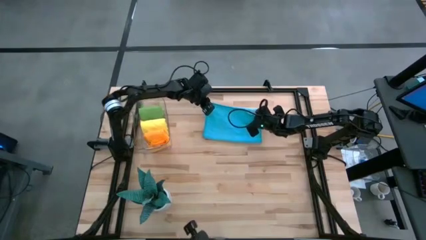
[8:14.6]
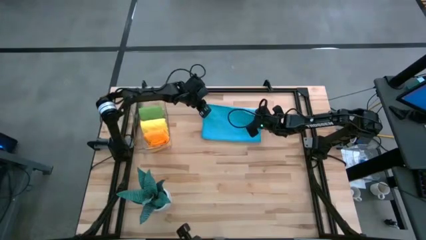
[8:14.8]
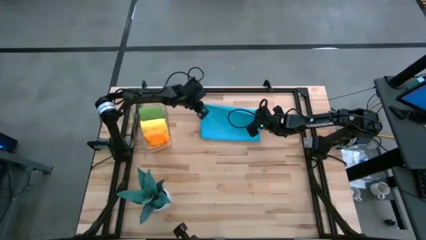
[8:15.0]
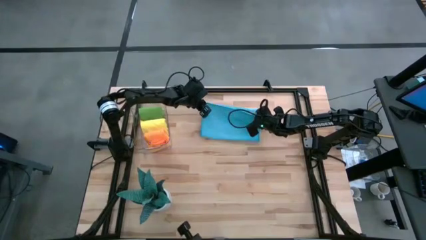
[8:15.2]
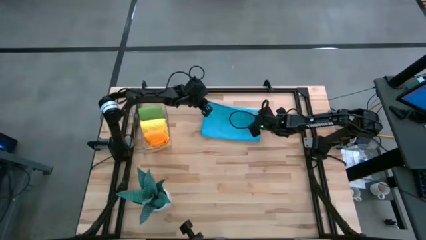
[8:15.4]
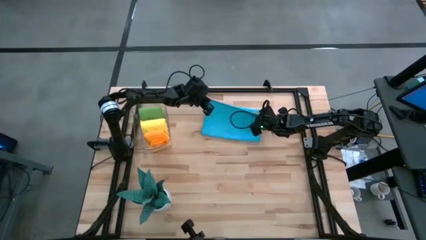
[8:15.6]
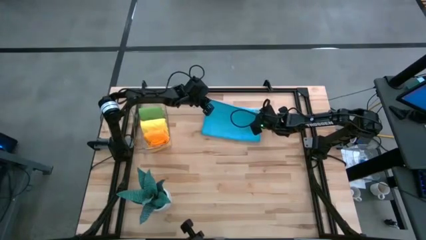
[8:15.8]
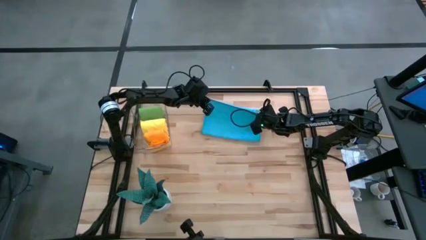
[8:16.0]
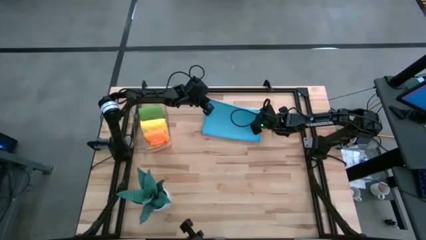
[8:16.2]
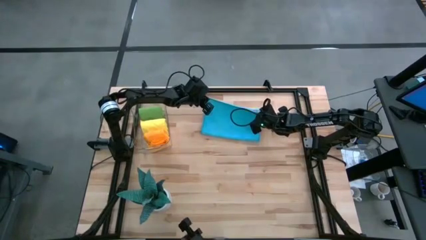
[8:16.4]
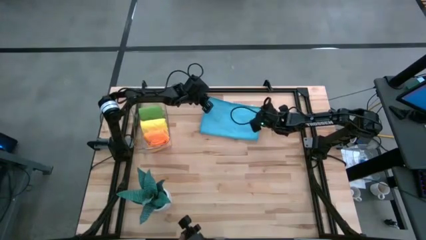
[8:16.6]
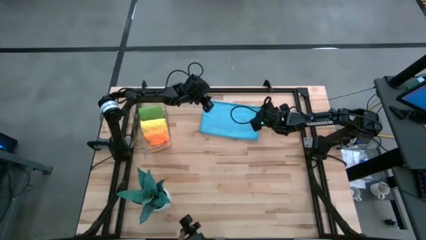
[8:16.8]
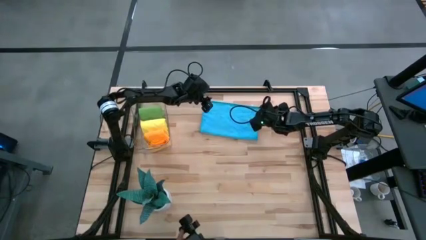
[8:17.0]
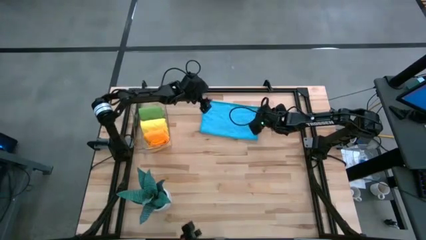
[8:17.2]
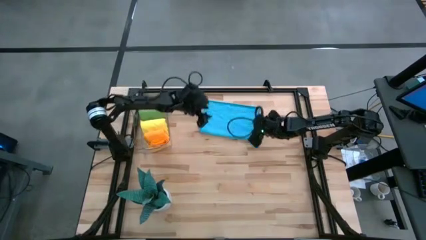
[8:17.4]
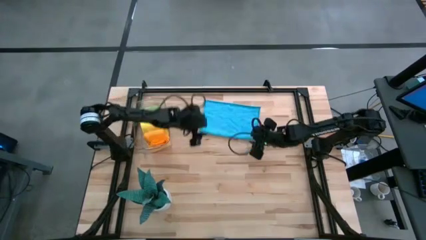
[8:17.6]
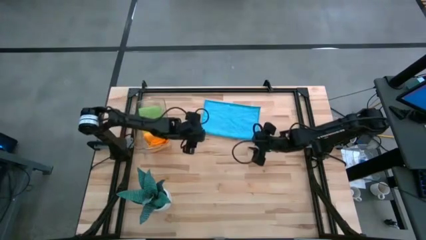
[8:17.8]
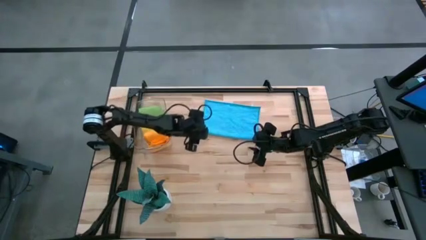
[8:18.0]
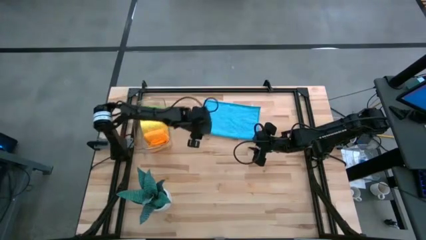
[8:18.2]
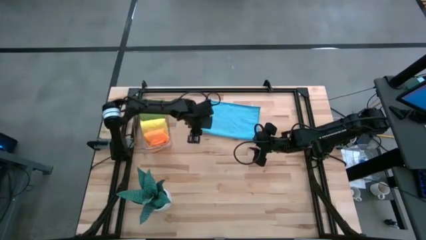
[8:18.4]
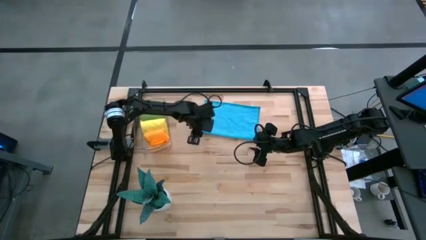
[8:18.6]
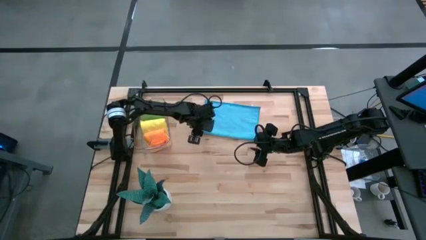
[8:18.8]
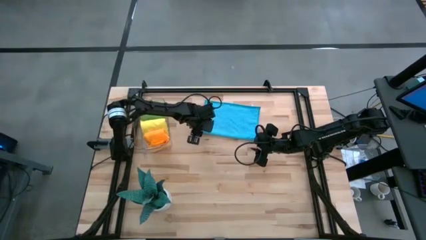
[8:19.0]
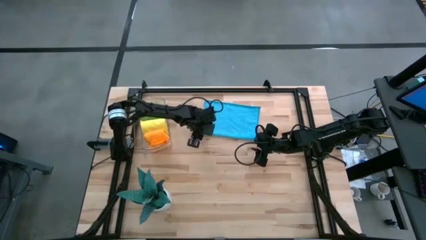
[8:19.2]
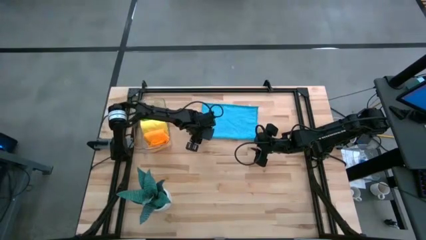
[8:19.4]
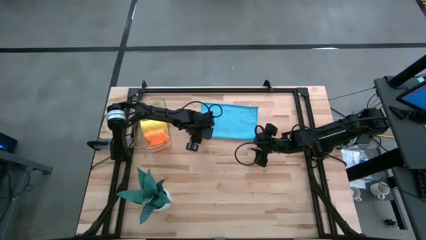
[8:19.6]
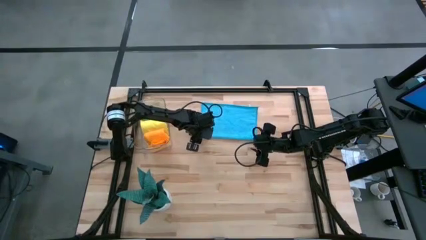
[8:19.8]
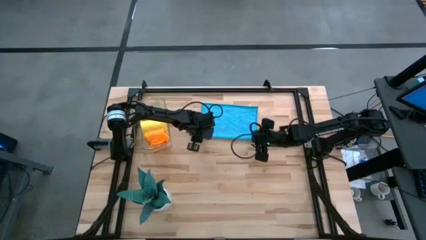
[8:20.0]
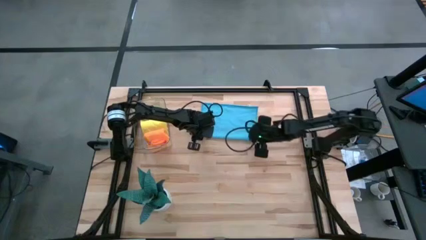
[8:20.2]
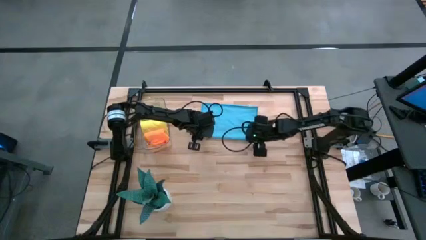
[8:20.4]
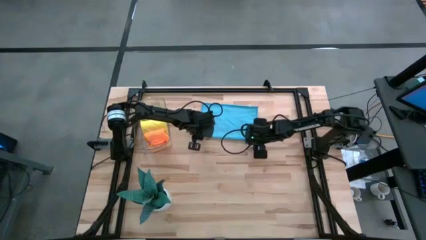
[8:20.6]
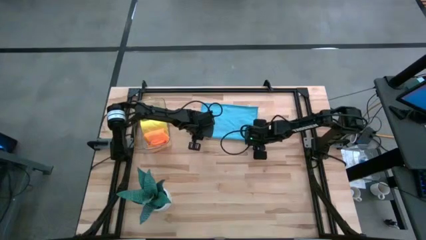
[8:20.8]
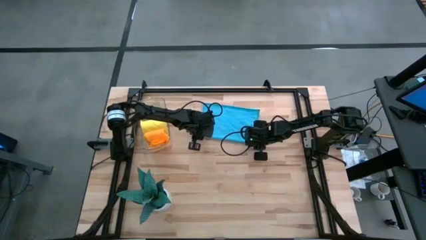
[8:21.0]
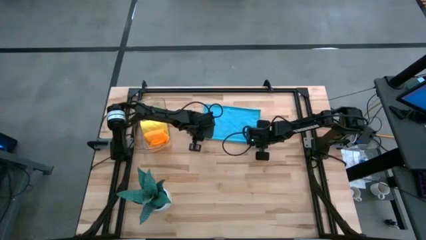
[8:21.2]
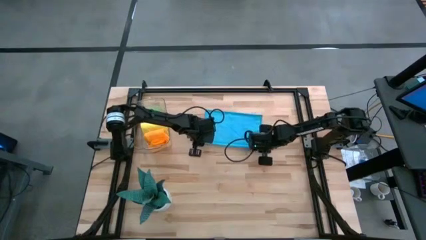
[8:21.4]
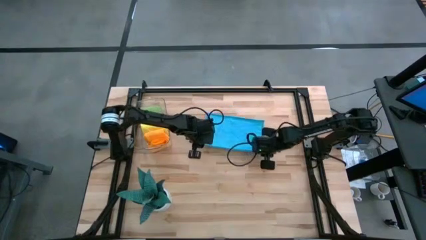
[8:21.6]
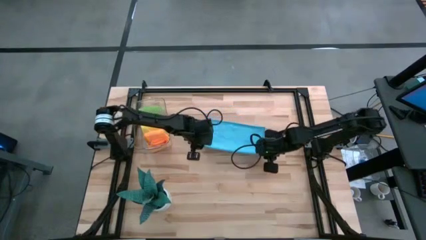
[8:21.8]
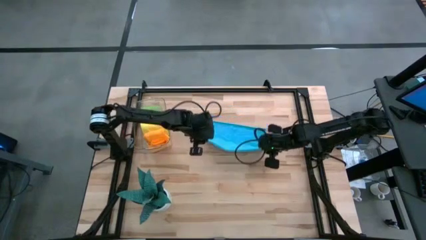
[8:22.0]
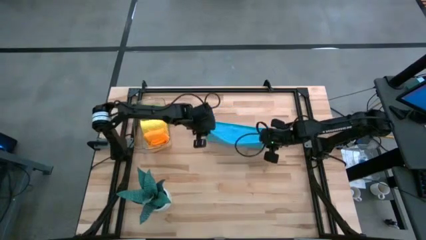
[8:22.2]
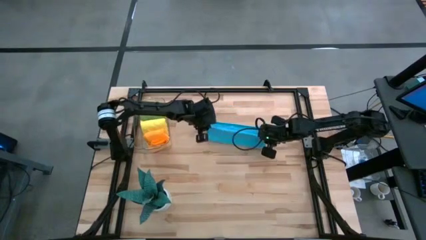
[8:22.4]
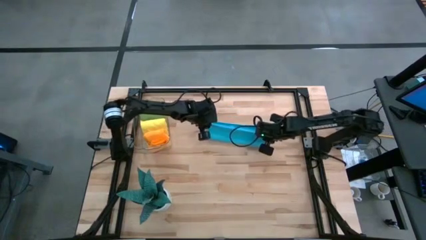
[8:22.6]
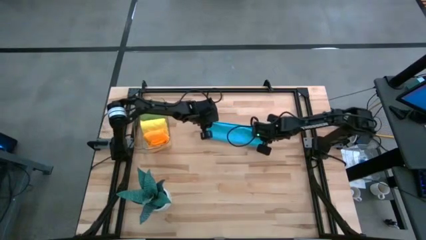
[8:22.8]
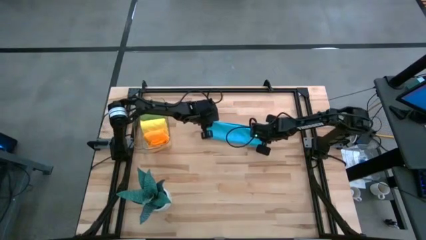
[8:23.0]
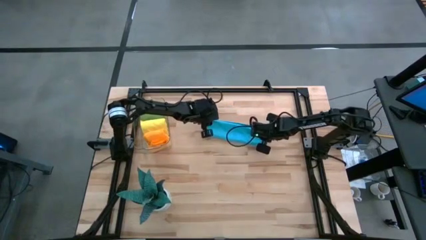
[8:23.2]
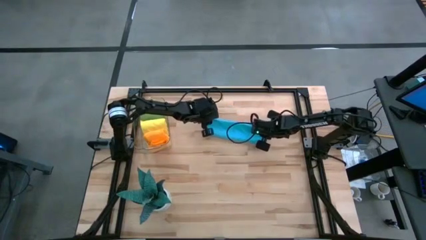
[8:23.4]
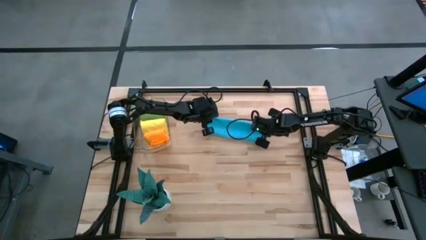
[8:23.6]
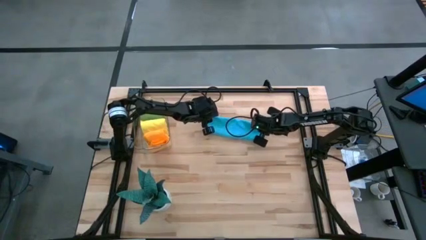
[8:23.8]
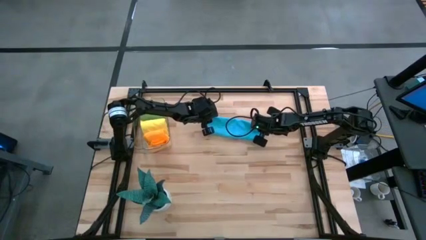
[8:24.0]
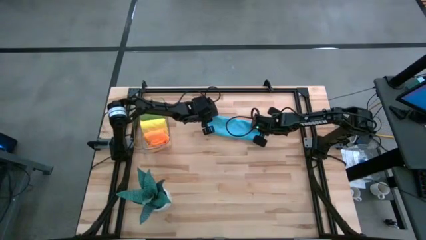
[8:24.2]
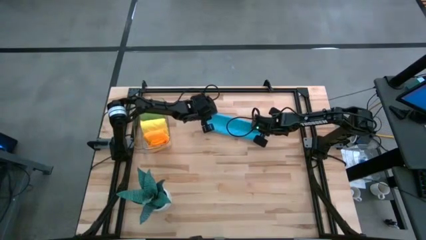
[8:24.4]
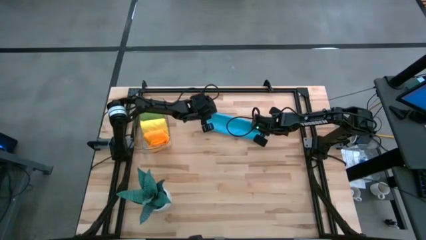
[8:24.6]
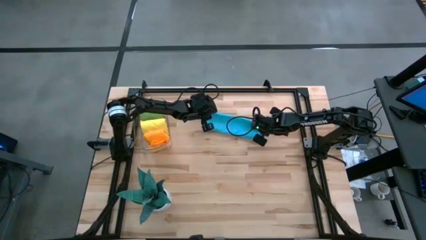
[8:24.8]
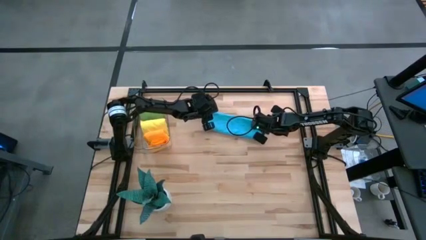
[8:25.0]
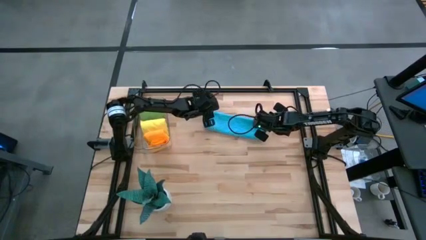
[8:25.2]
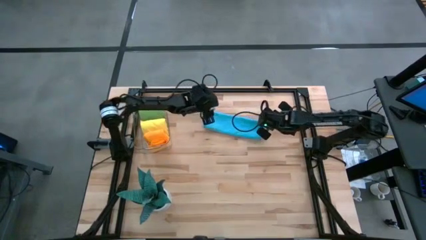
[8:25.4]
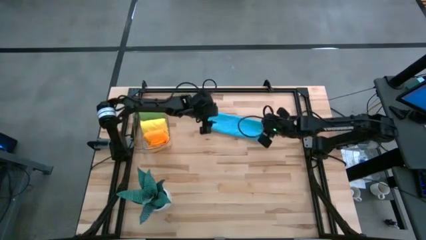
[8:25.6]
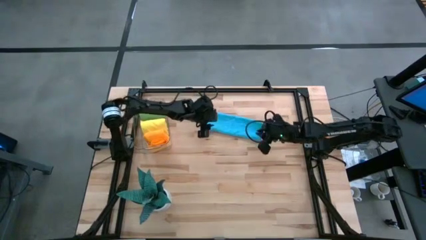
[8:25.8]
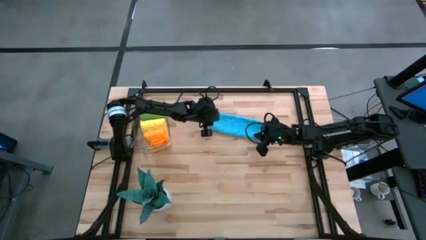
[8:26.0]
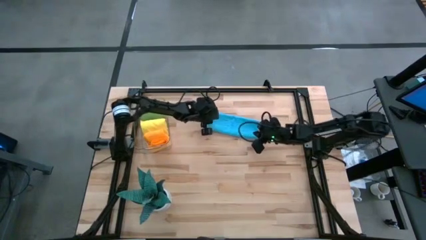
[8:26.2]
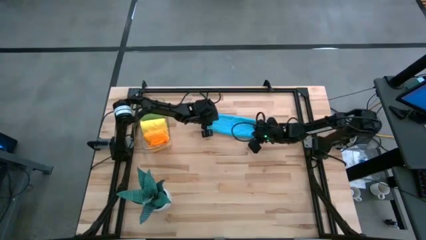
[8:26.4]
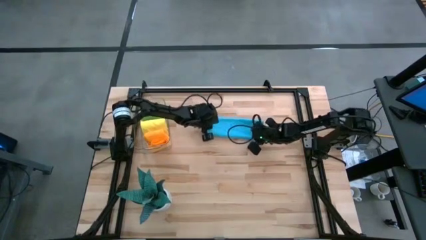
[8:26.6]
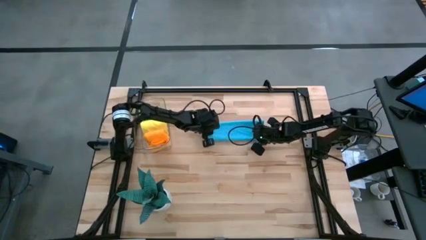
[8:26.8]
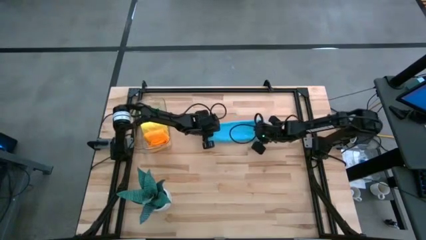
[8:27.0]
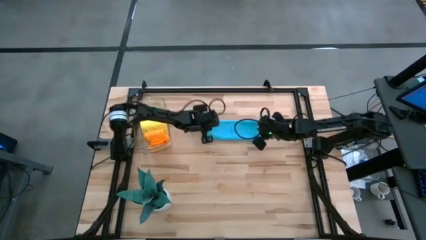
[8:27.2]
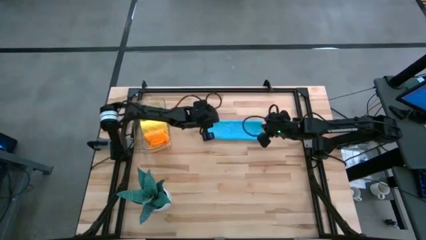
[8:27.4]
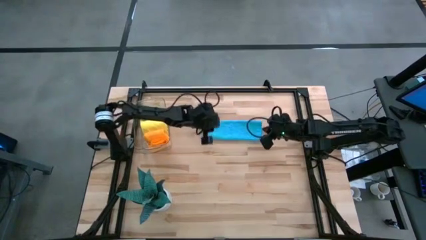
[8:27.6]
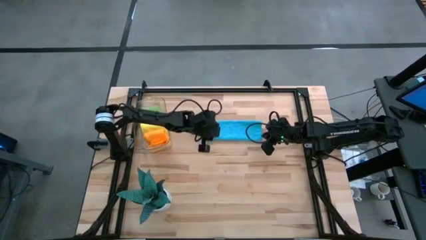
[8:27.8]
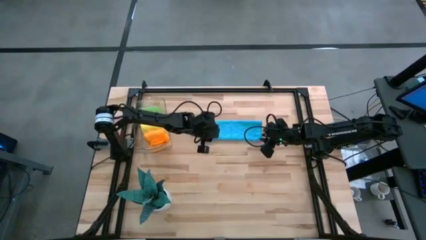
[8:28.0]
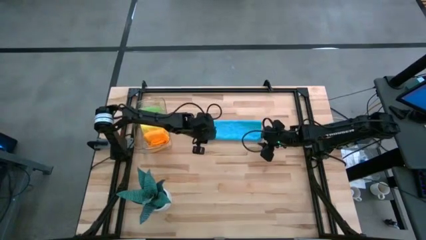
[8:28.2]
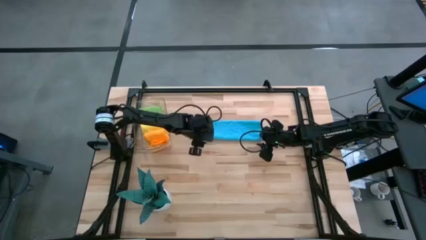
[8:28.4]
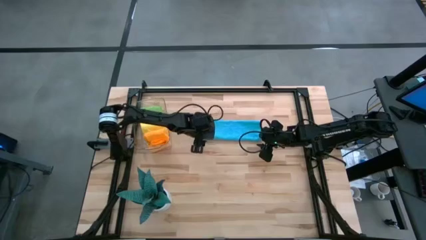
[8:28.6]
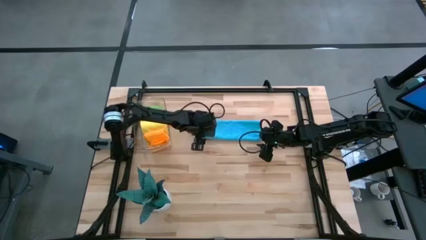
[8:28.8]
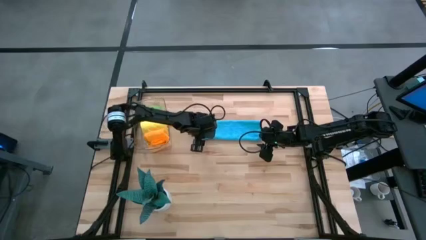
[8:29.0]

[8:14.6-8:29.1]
Task: Roll microfiber towels into tight, uniform cylinder then place into a basket
Fold the blue microfiber towel

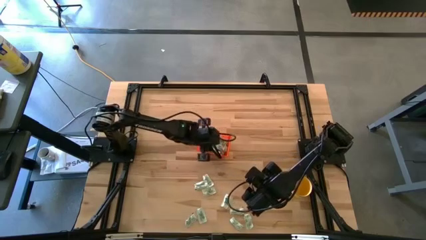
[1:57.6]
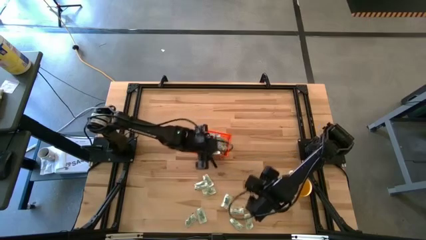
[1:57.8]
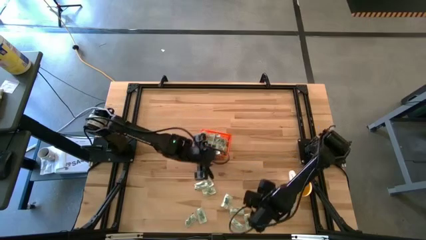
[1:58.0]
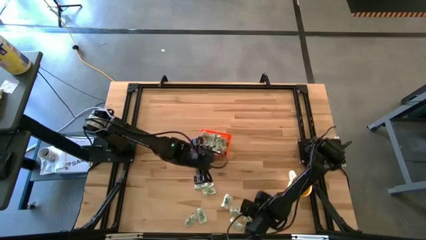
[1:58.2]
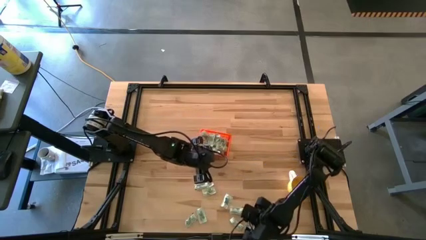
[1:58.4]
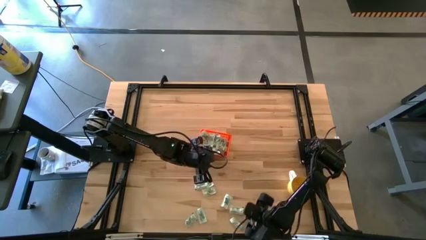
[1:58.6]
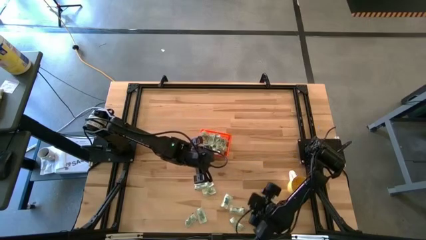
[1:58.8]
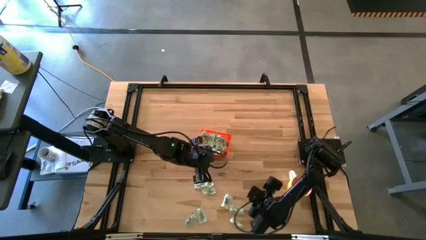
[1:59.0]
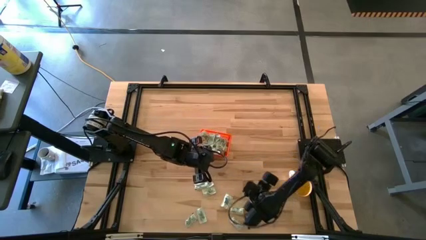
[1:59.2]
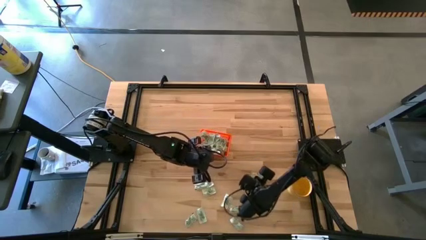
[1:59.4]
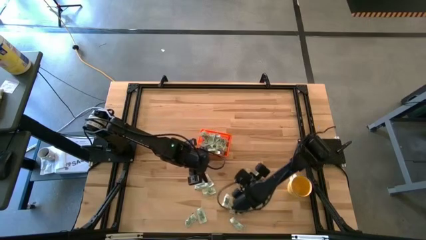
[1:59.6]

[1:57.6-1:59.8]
Task: Pick and place Stevia / Truvia into bins
Put the light green stevia packet into the orange bin
